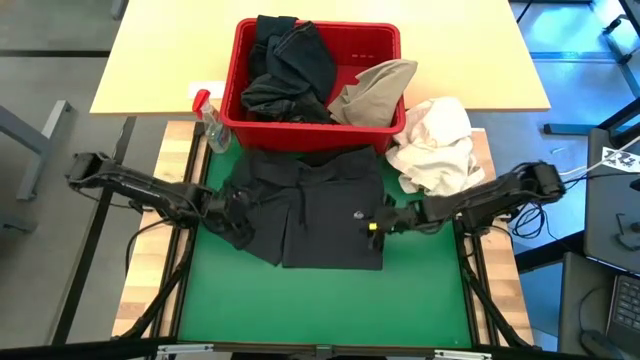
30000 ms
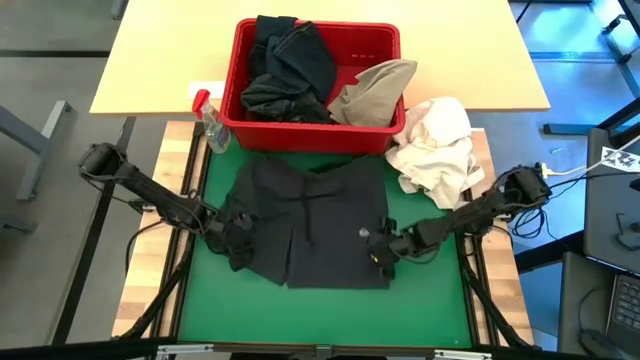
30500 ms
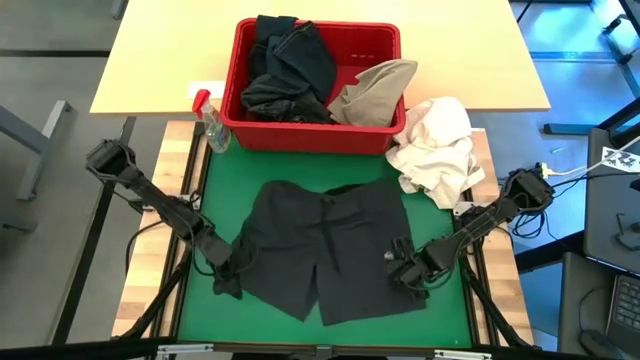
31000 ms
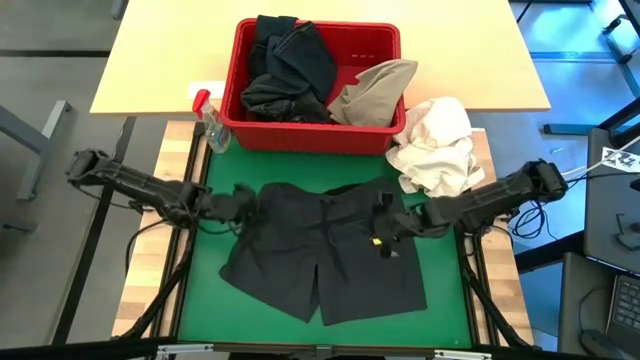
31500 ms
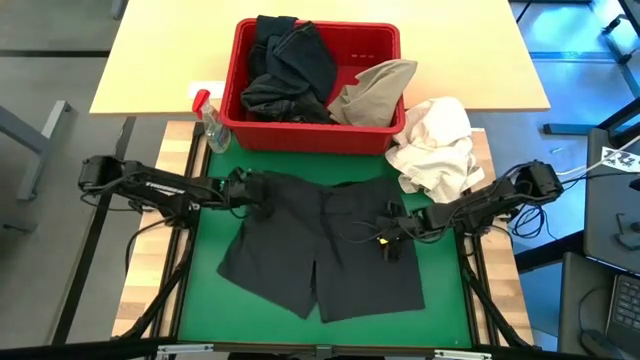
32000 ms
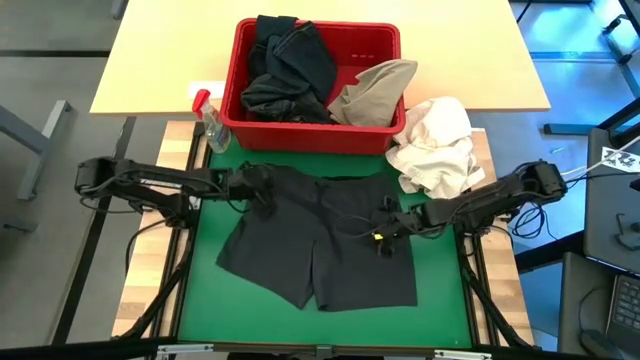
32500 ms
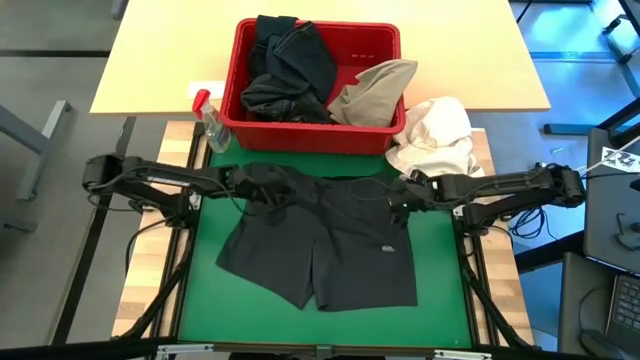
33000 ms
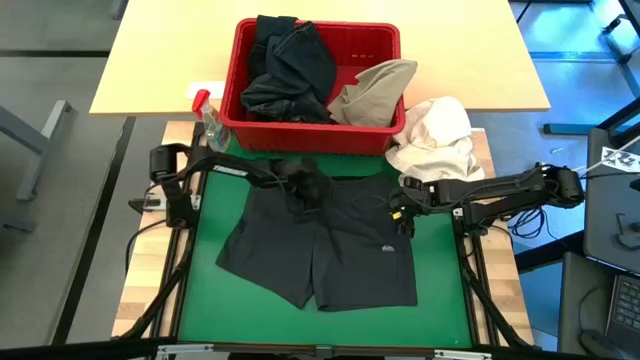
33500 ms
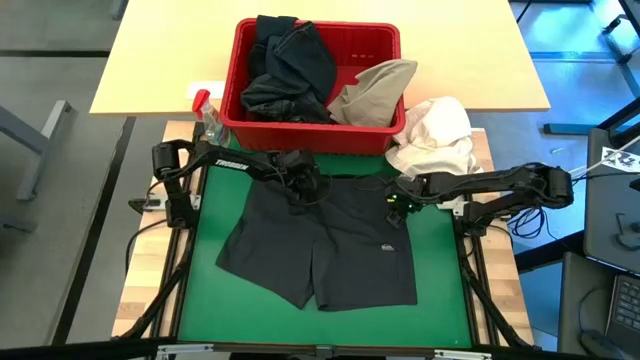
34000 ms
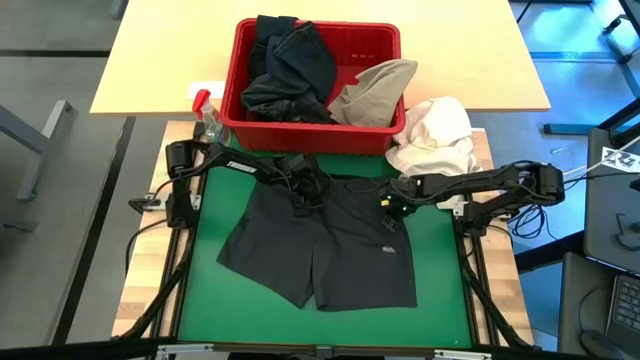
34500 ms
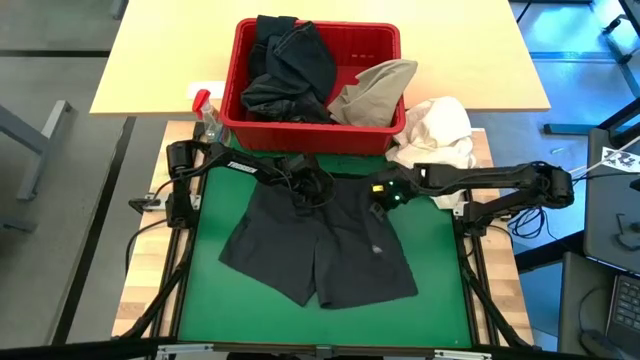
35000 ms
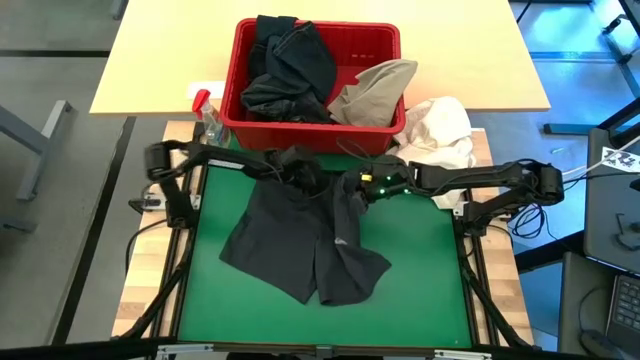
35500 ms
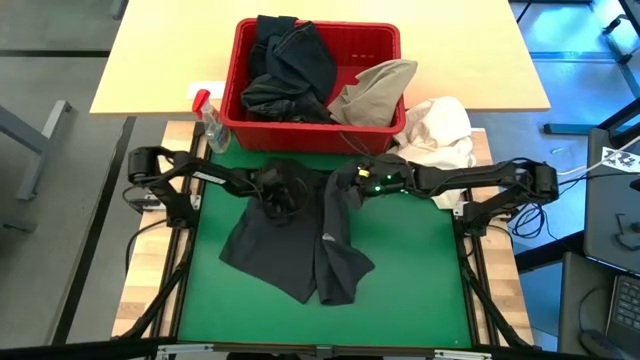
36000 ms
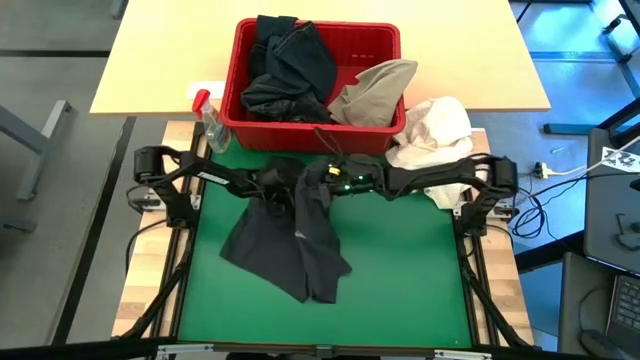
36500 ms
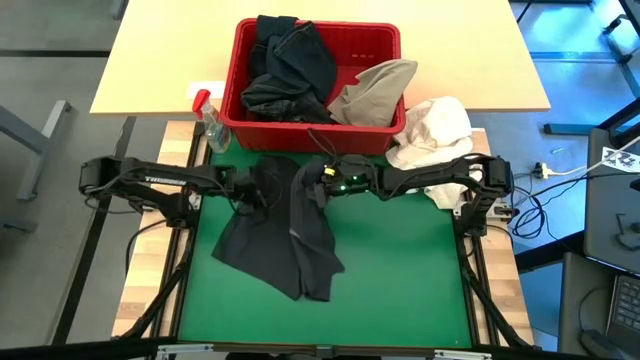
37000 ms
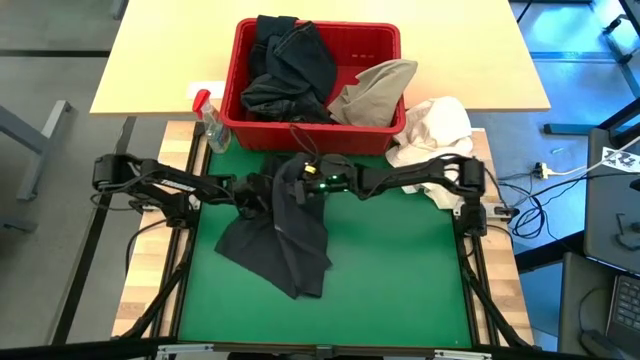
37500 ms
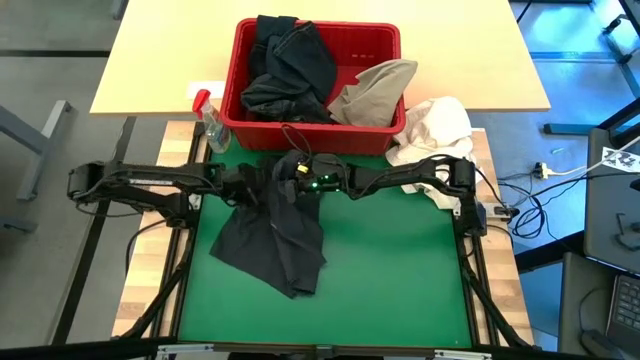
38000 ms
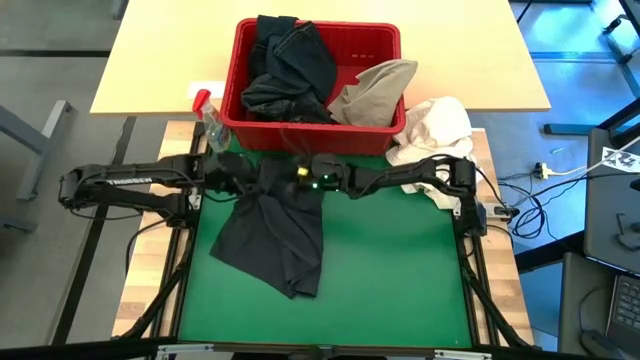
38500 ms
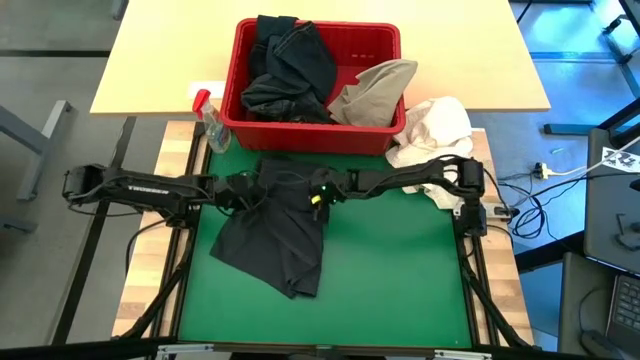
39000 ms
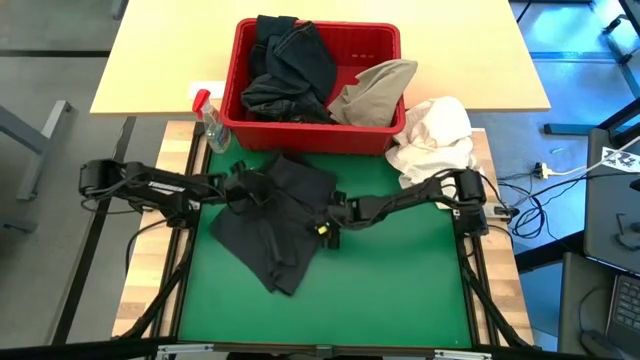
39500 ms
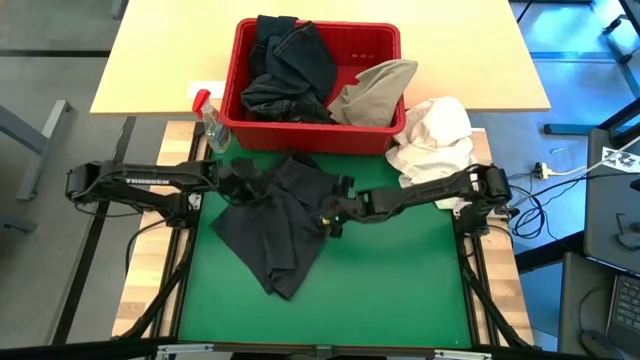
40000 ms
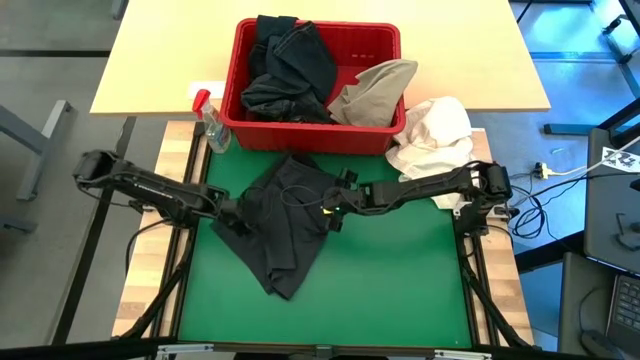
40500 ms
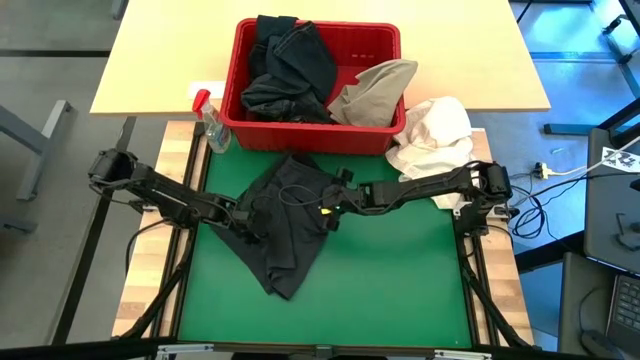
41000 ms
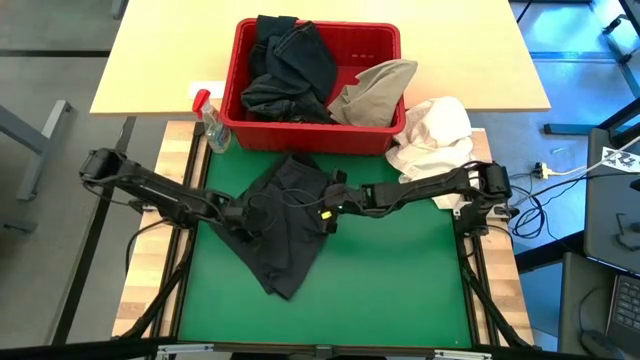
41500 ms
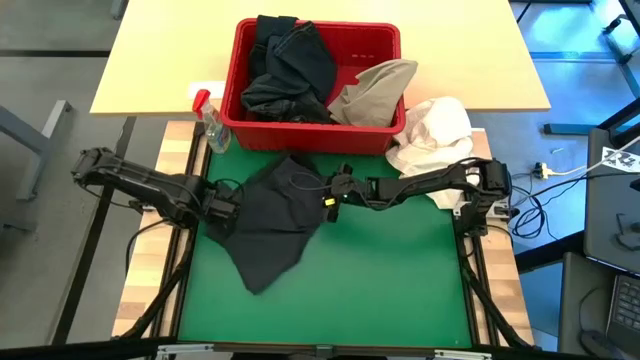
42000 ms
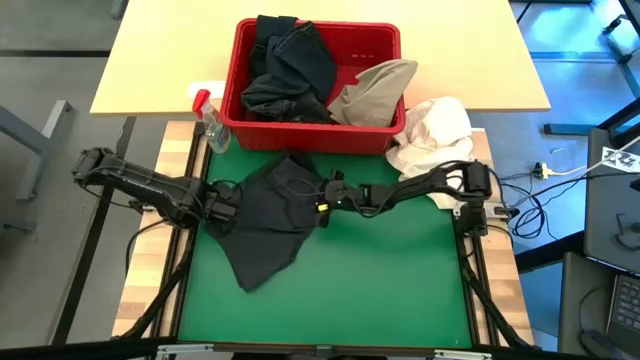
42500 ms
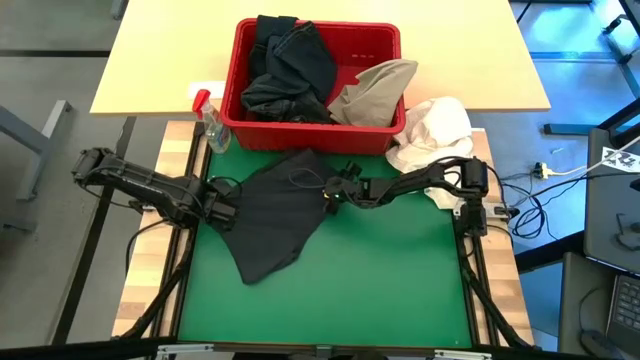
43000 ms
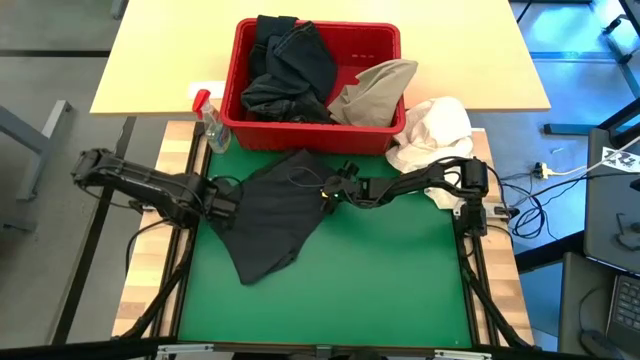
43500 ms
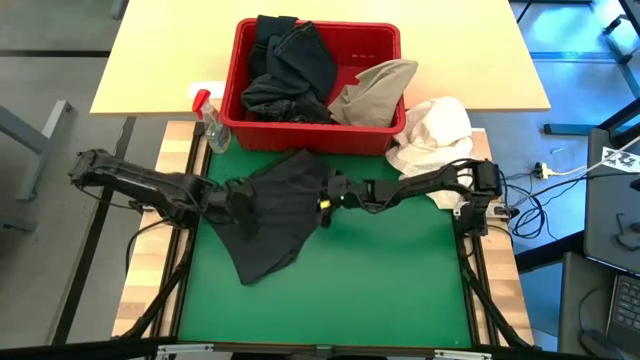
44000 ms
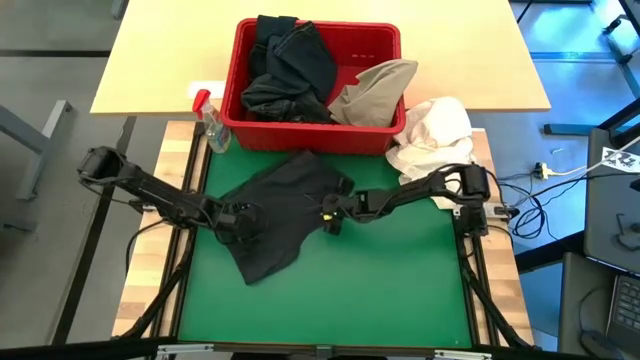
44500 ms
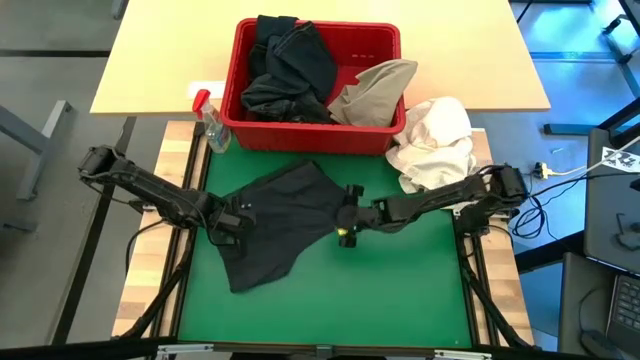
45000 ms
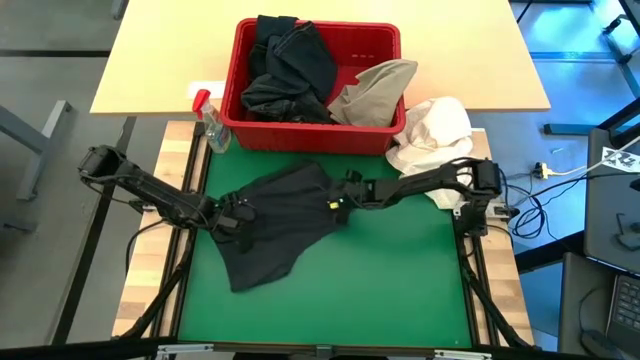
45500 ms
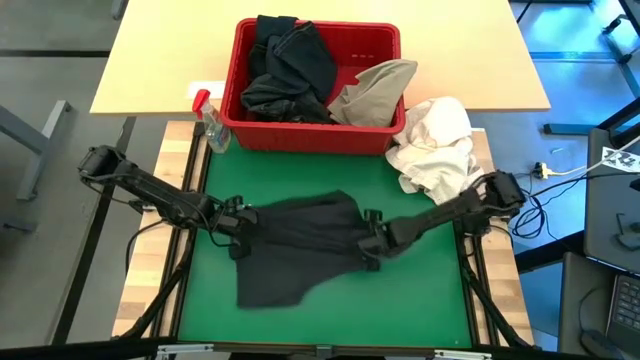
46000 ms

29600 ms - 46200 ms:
Task: Fold Laundry from Bin
Fold the black shorts

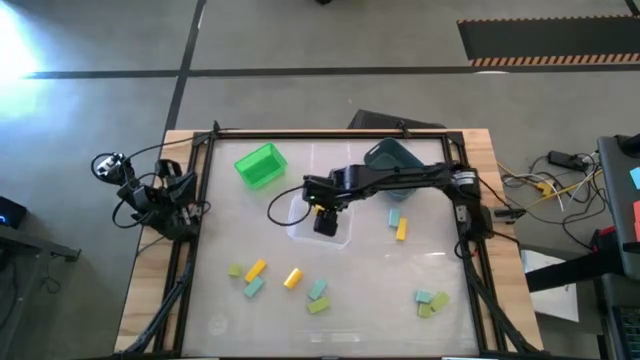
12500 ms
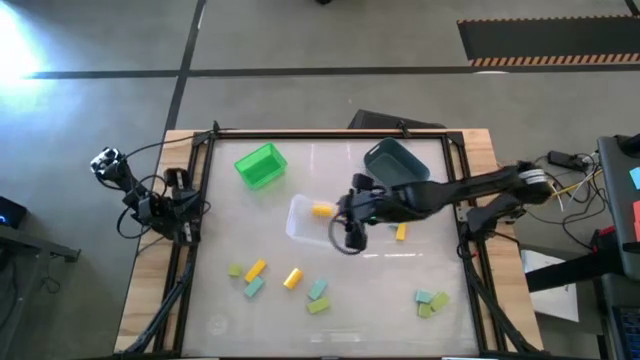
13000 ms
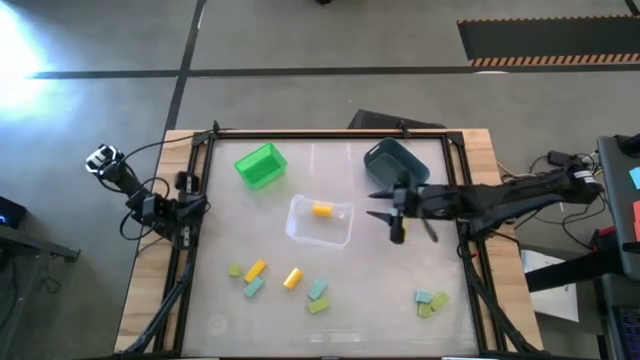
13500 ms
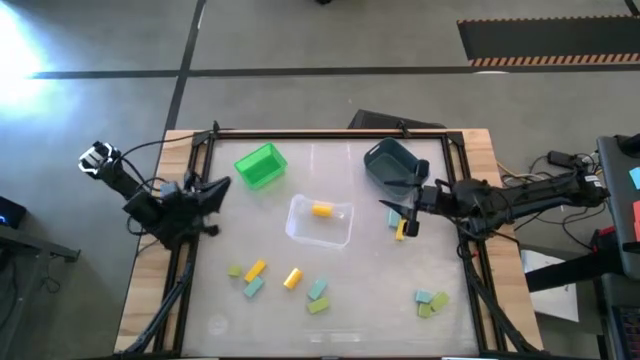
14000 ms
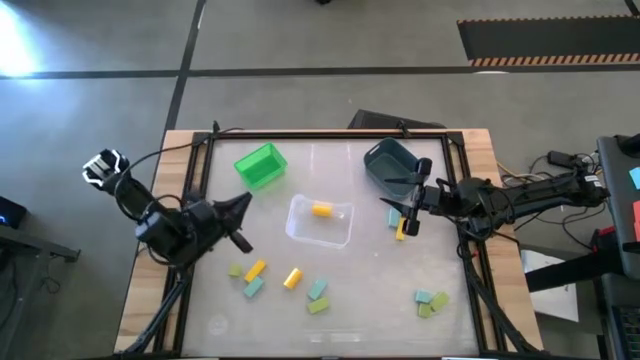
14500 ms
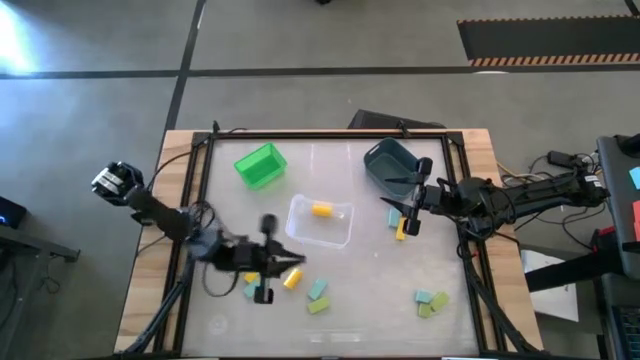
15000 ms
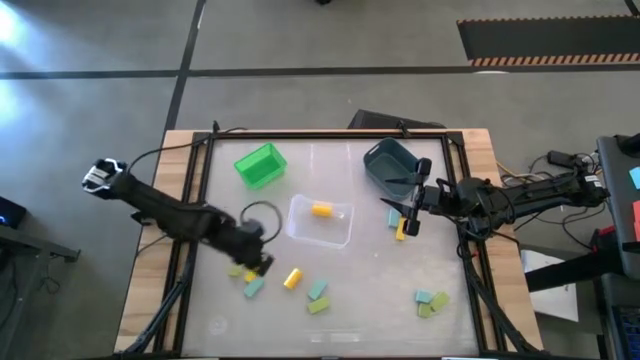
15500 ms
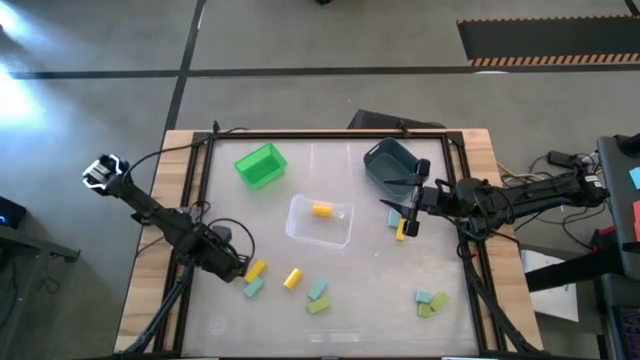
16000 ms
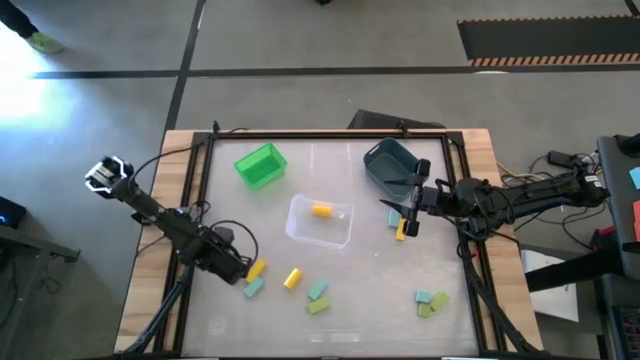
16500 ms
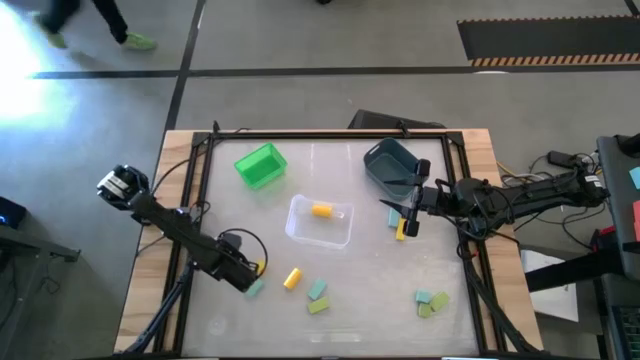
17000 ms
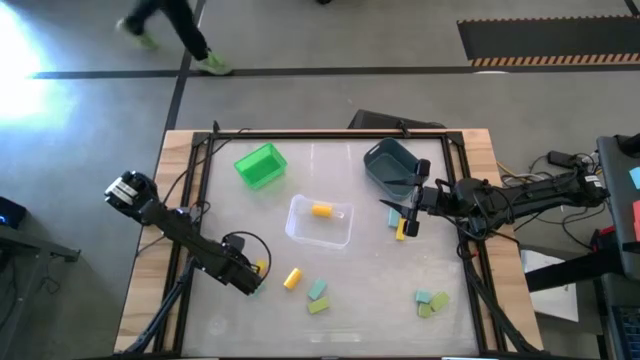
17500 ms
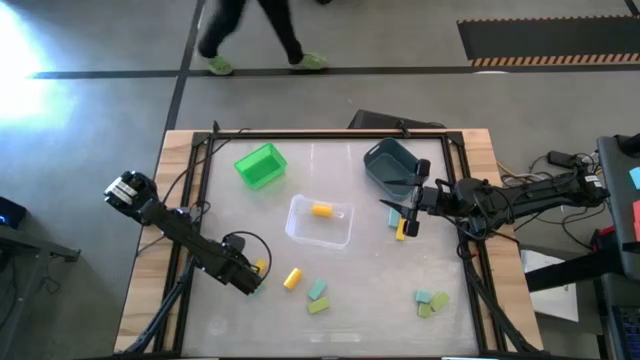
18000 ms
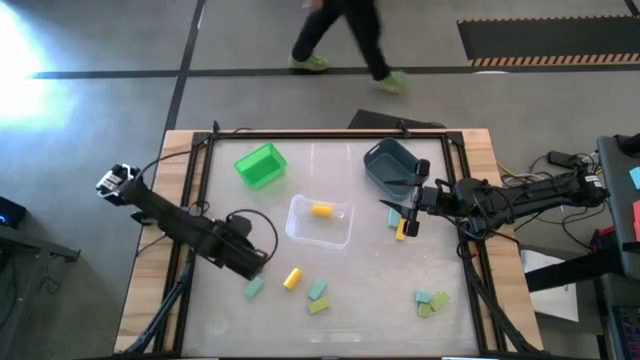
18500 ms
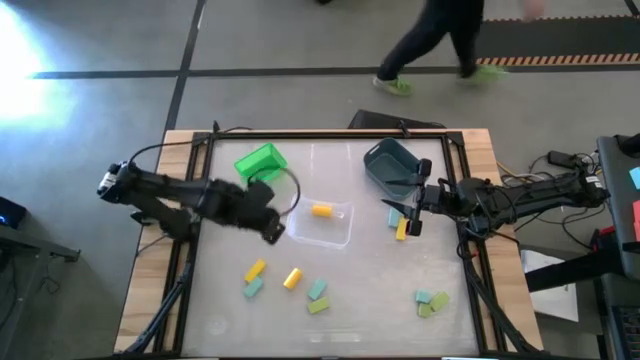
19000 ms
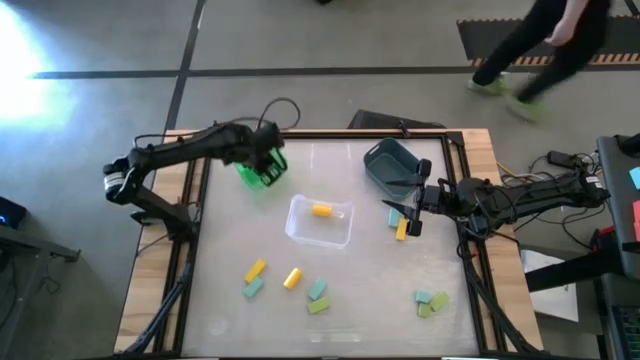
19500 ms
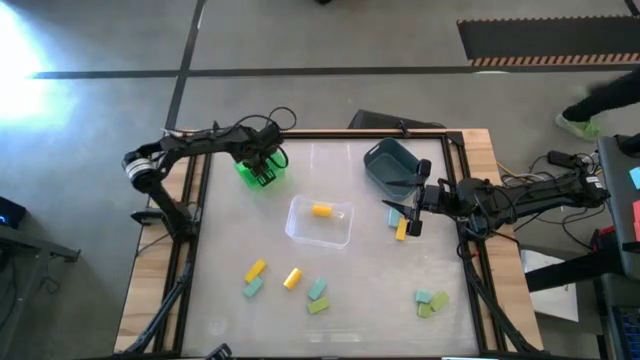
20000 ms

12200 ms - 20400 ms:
Task: Sort & place blocks by color
Put the green block into the green bin
